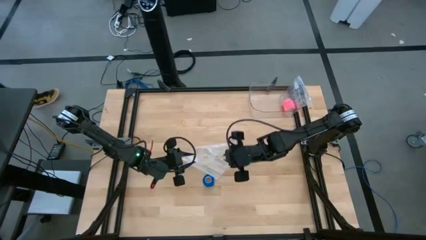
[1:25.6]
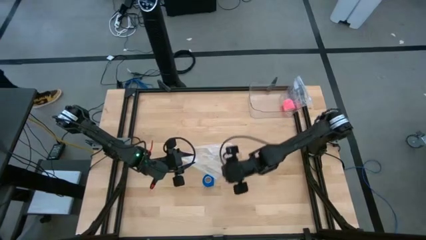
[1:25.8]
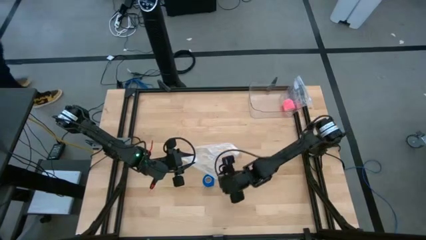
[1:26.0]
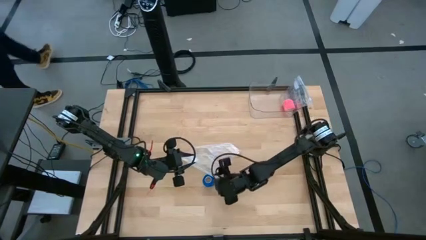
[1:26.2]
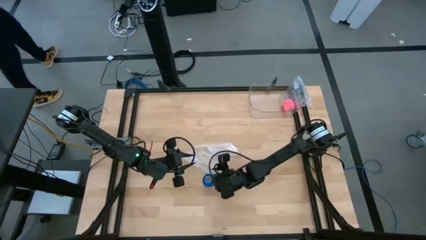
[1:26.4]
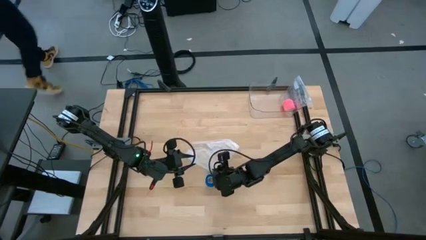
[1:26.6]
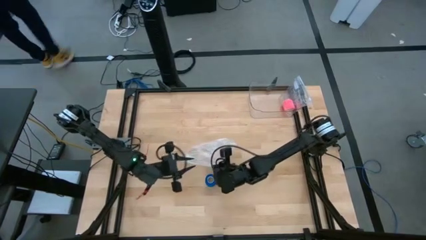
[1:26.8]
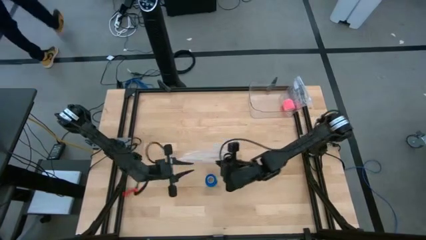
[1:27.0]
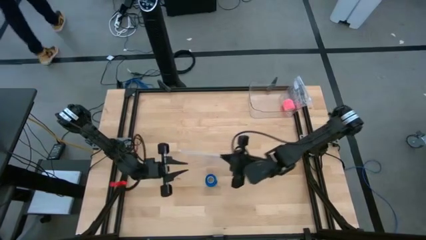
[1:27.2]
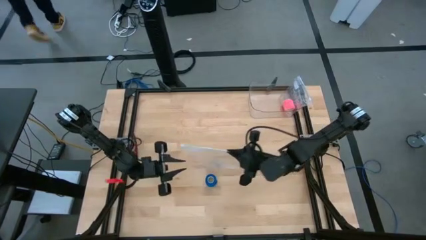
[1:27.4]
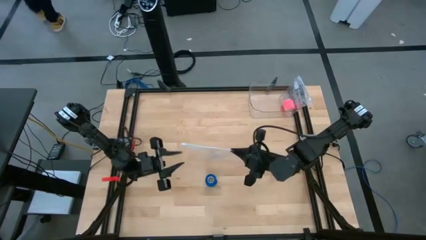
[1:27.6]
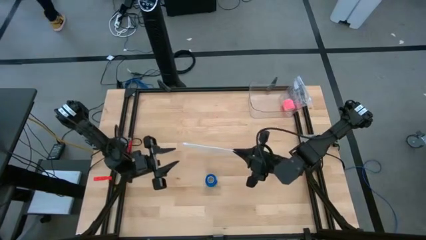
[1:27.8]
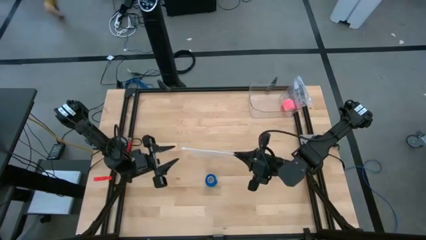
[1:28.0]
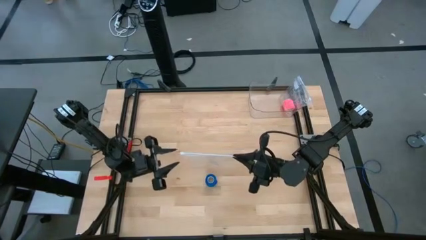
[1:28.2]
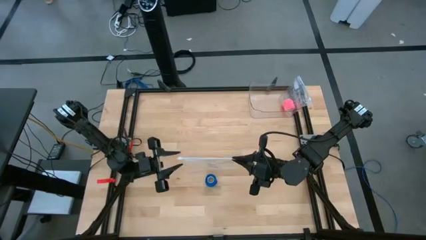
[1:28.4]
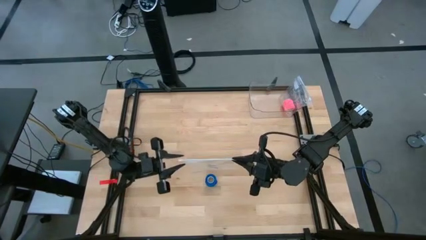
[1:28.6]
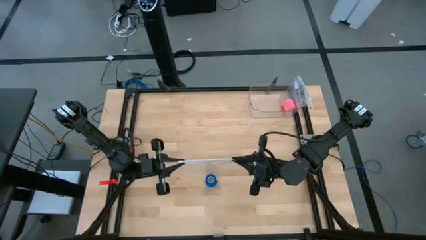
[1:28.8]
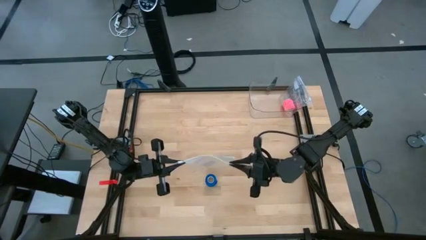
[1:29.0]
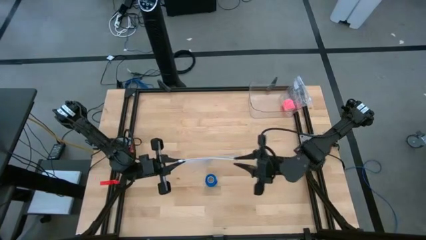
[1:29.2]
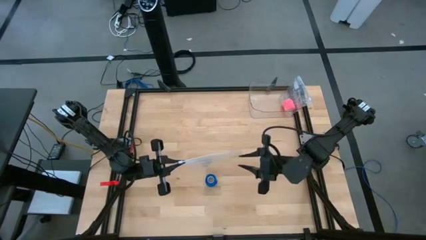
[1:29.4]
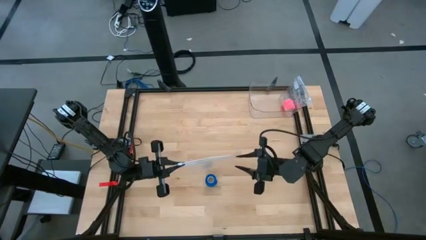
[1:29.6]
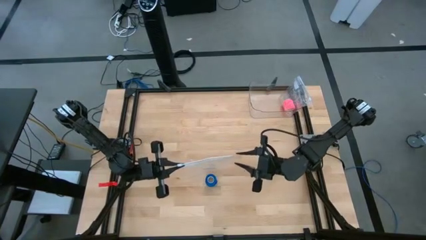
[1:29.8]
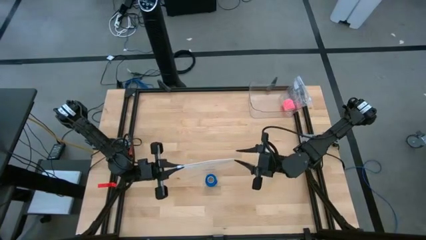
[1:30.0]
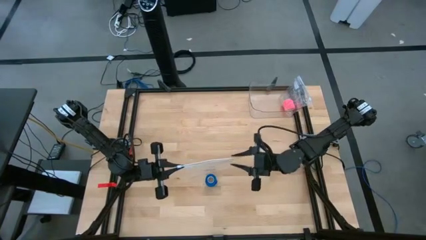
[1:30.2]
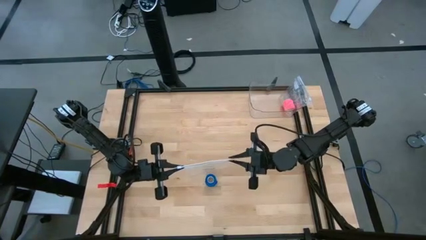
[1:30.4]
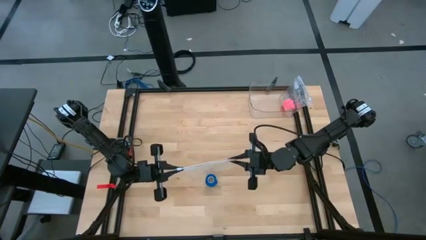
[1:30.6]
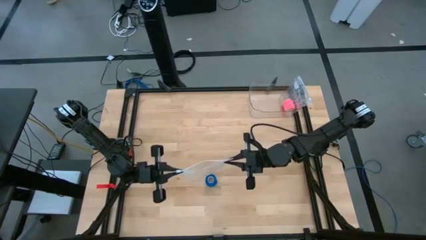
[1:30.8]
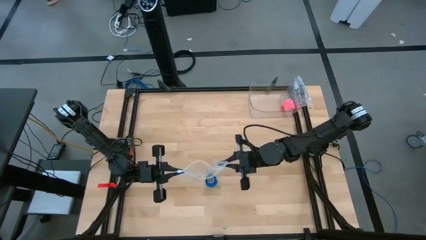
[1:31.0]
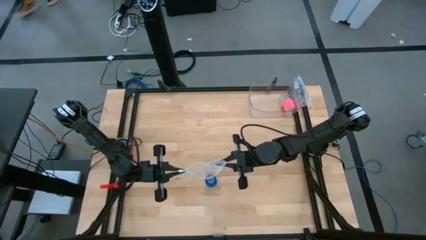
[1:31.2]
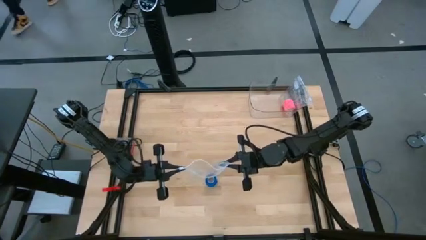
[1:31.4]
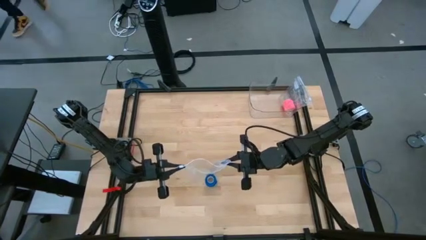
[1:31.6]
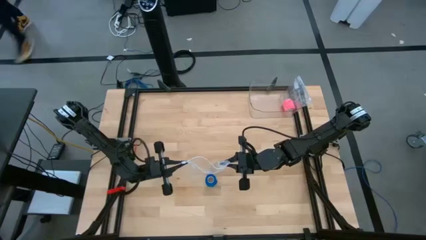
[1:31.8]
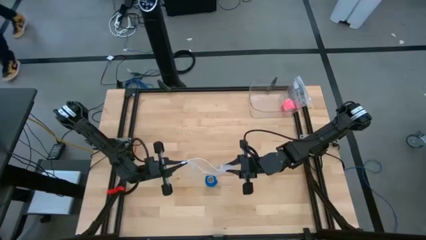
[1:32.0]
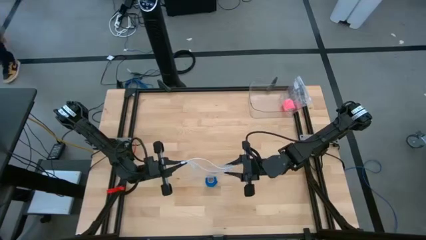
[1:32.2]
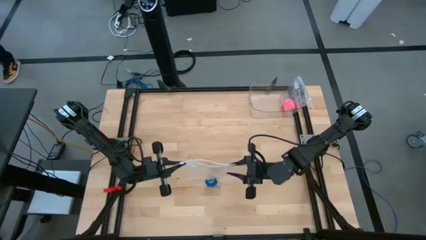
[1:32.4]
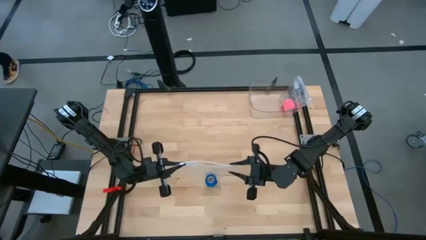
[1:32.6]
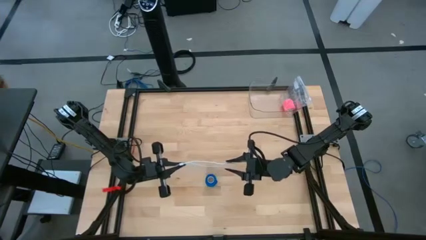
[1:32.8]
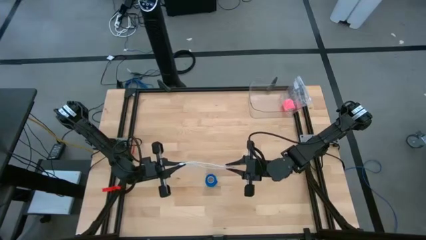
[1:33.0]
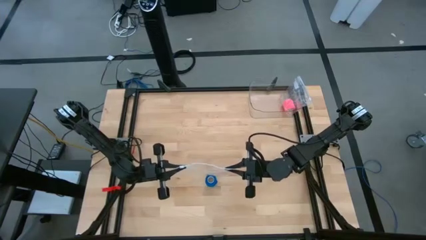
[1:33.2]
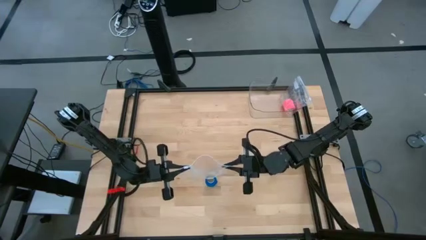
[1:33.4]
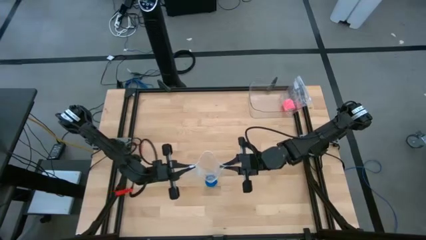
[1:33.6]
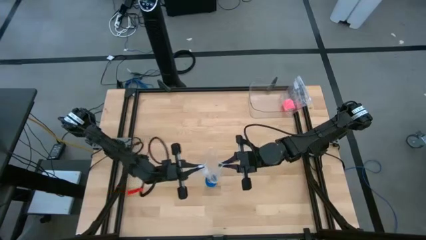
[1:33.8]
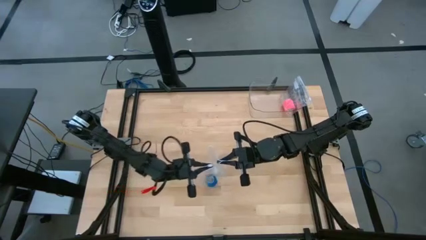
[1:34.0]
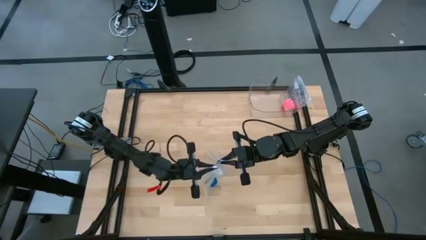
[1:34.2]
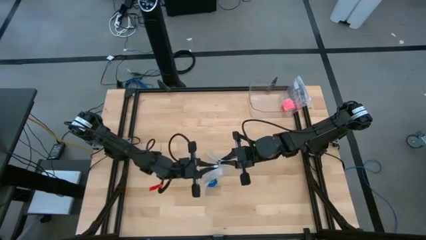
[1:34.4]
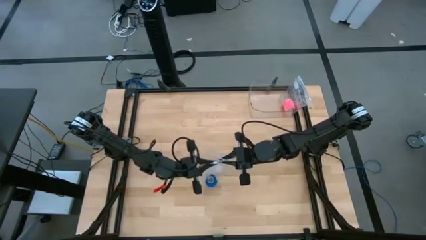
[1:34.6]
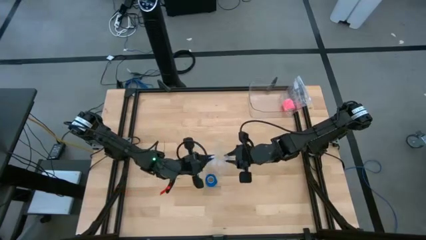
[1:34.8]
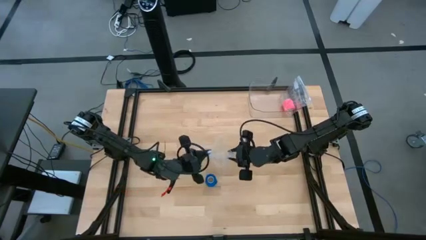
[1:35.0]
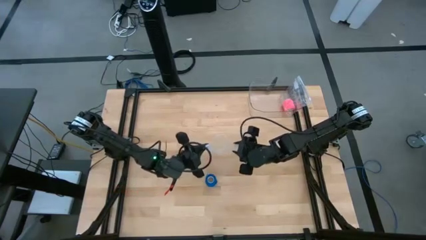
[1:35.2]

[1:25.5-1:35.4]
Task: Roll bandage
Open the transparent zip bag

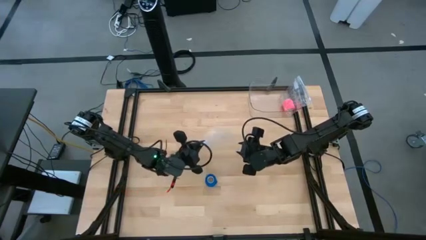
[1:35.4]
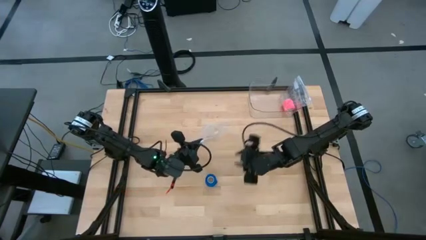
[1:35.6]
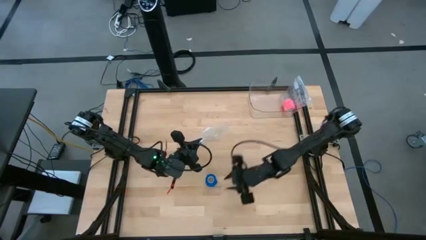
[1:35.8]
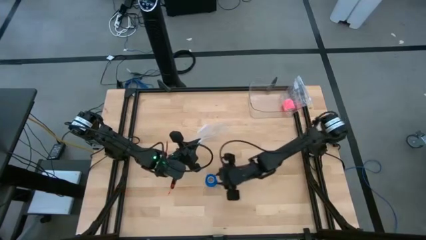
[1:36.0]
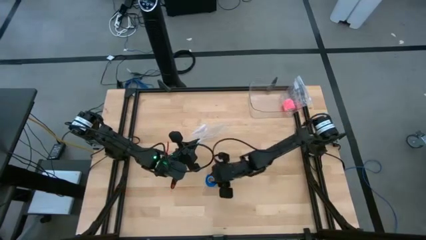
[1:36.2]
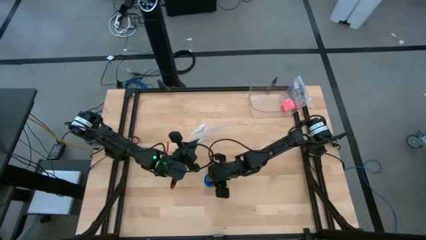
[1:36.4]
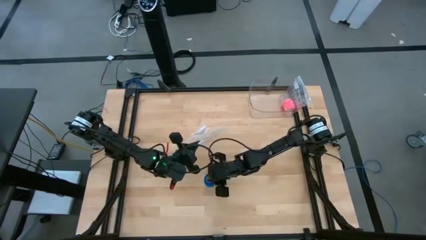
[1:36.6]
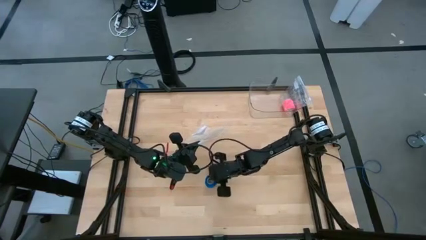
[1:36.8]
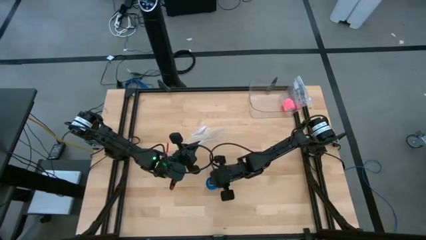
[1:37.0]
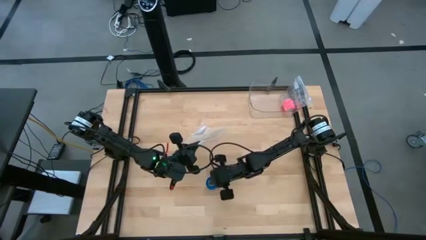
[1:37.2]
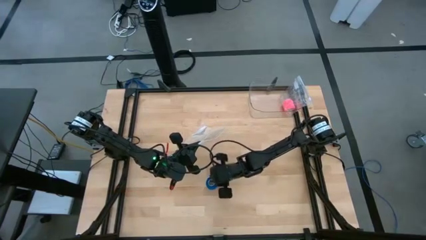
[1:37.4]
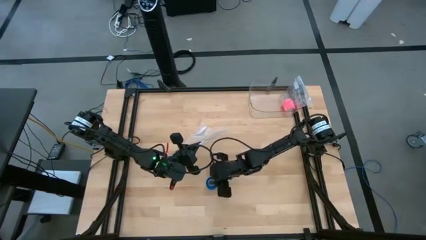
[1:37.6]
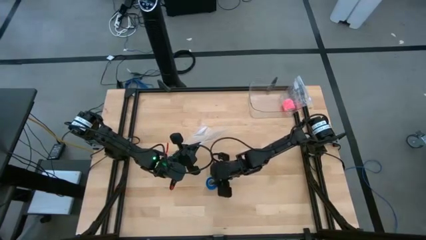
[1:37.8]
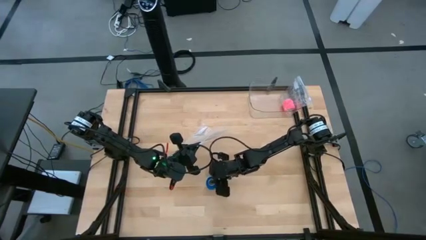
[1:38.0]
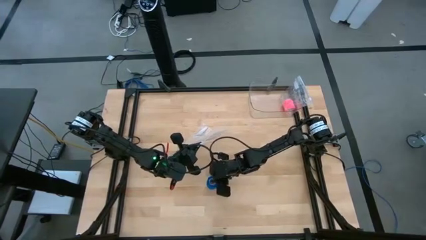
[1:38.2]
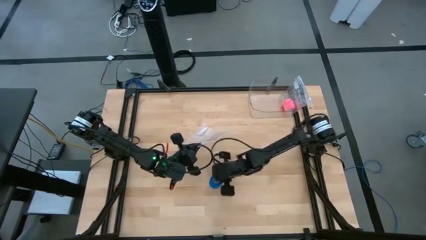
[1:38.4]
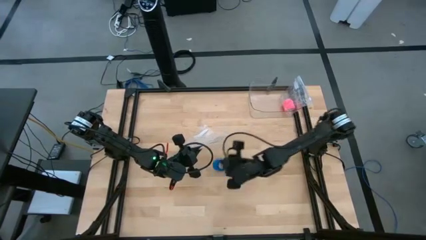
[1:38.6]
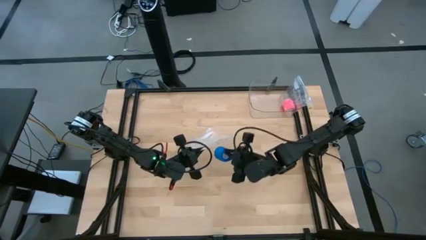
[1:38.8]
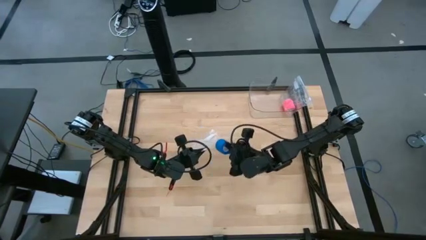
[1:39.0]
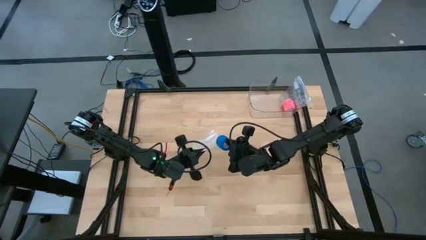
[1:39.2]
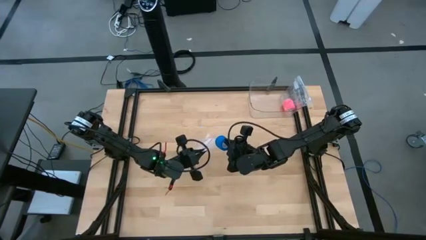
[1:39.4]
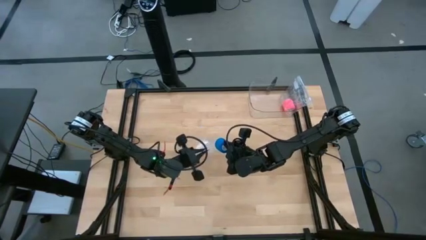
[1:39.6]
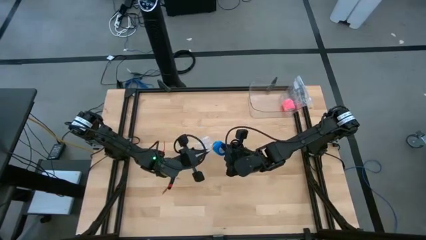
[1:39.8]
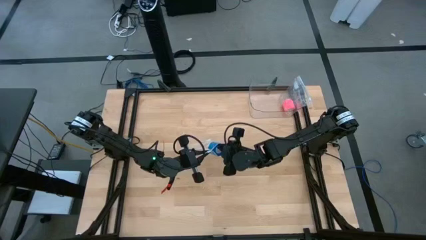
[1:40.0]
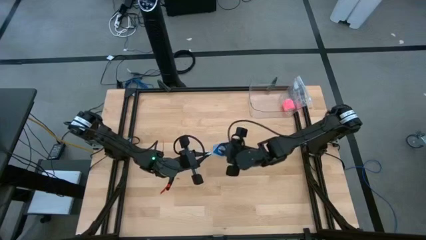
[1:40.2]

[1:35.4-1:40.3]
Put the blue bandage into the transparent zip bag

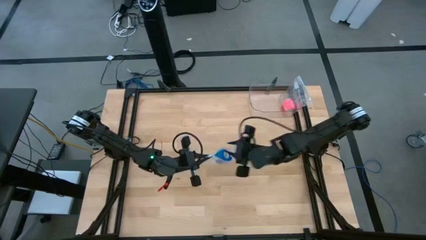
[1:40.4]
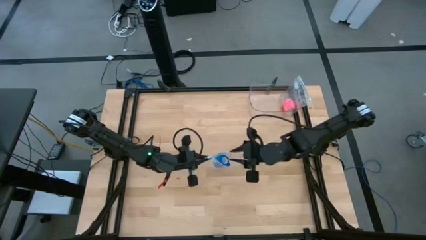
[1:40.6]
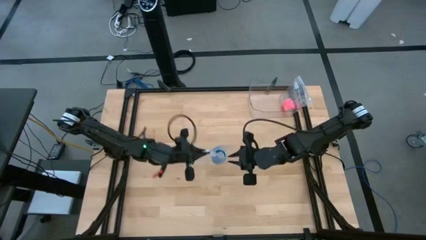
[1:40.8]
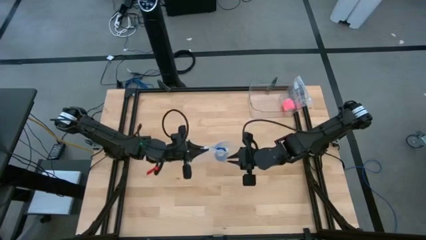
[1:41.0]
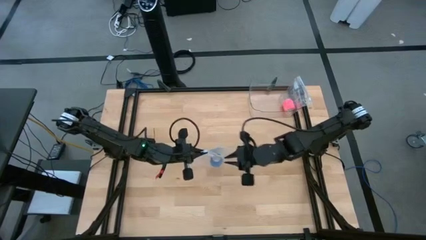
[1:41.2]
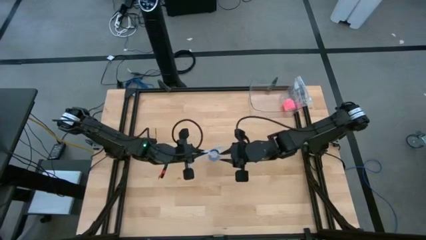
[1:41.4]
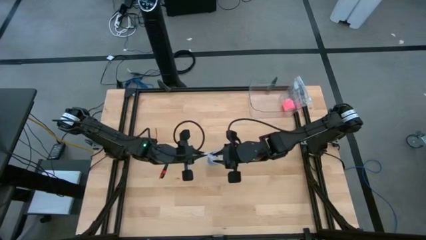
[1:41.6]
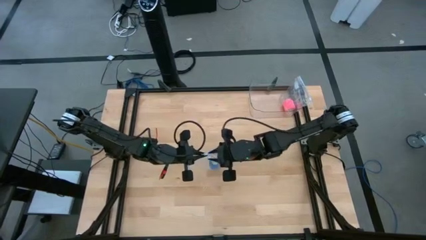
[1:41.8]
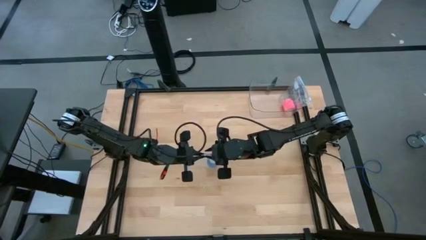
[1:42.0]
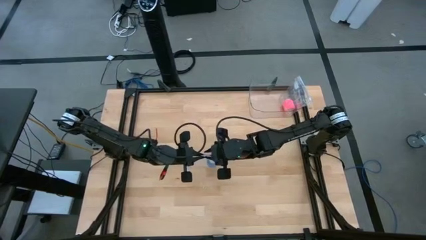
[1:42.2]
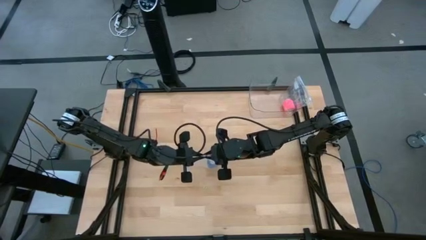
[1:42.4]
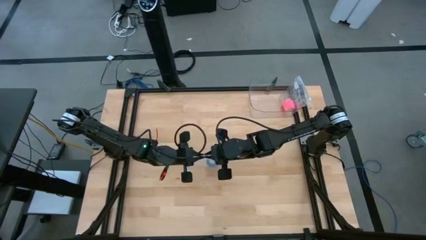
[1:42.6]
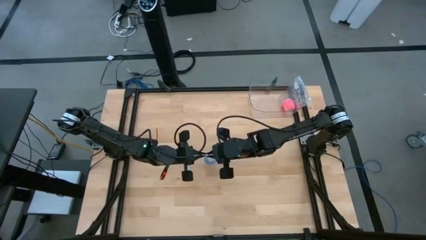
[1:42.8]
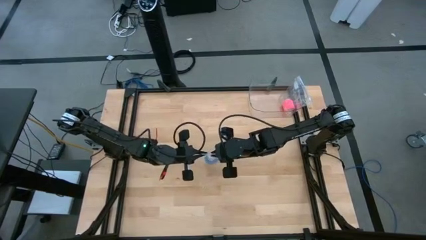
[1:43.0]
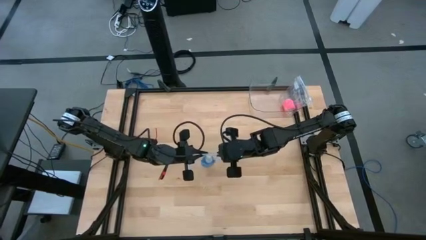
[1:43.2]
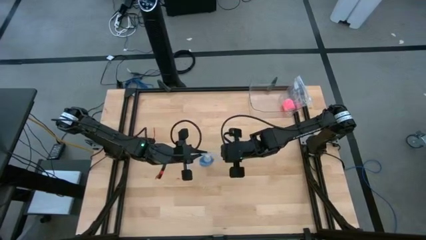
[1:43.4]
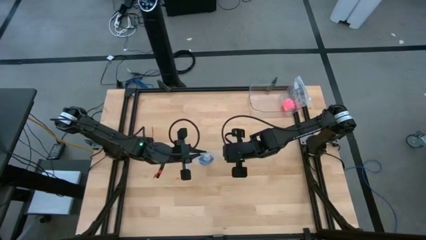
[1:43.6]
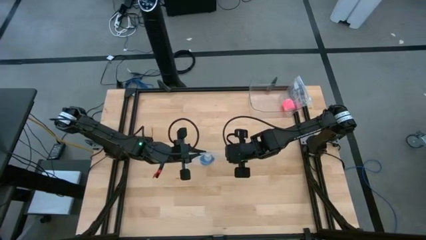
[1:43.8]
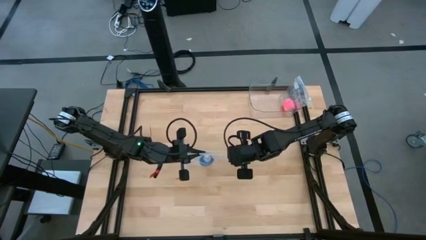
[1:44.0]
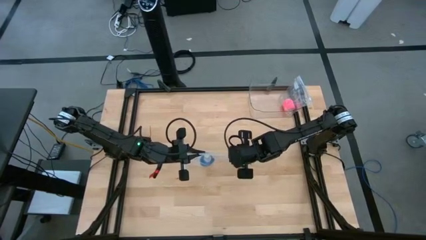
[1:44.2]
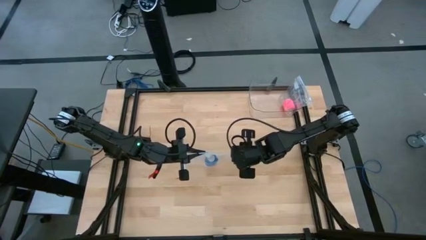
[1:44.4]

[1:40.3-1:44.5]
Close the transparent zip bag
